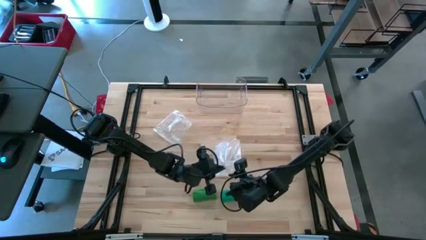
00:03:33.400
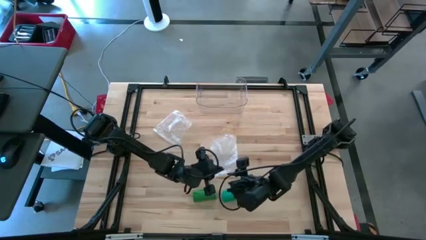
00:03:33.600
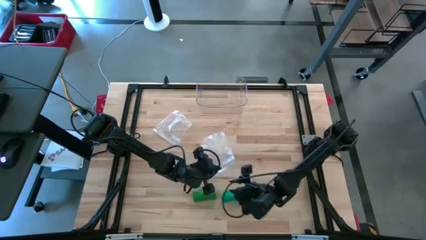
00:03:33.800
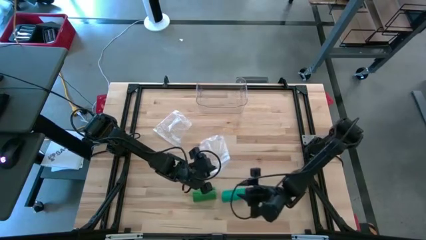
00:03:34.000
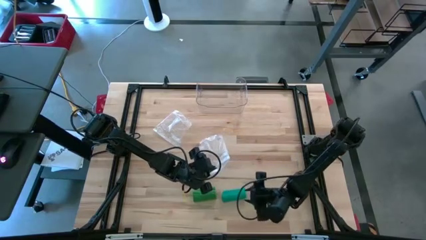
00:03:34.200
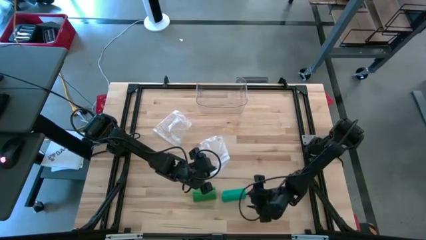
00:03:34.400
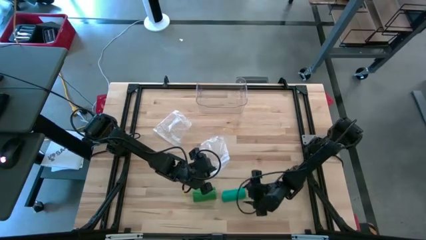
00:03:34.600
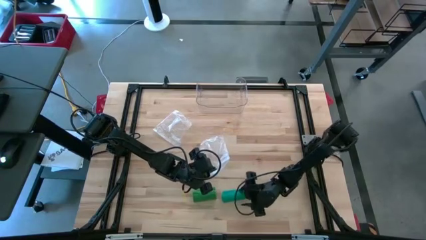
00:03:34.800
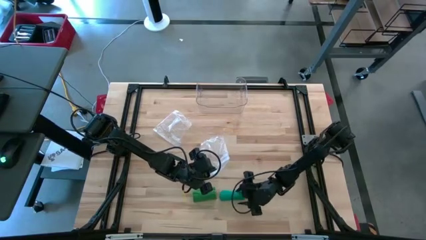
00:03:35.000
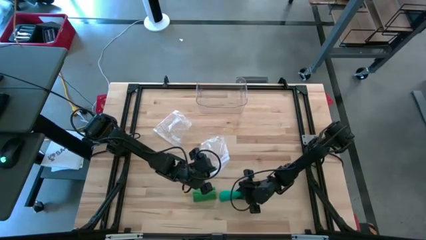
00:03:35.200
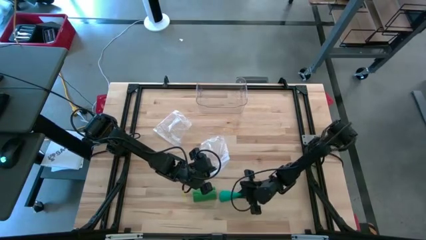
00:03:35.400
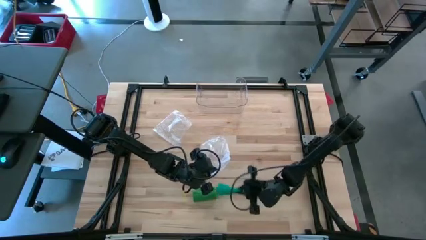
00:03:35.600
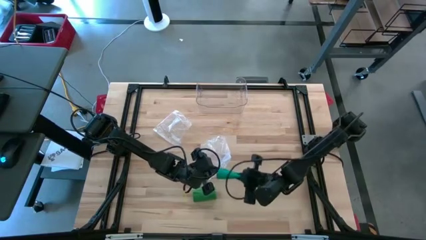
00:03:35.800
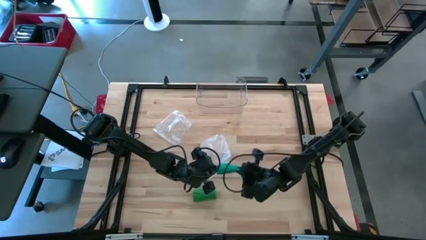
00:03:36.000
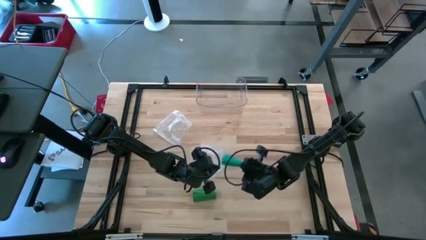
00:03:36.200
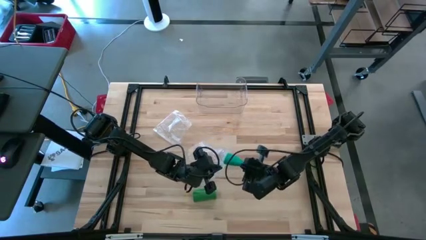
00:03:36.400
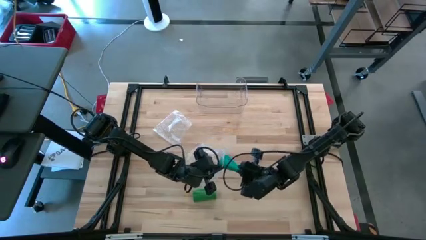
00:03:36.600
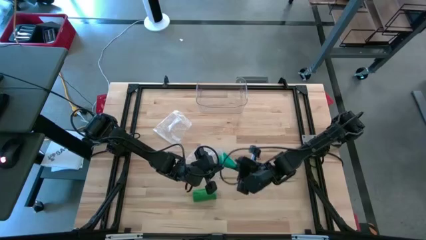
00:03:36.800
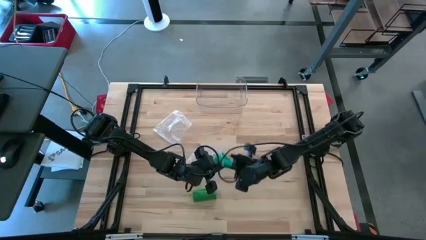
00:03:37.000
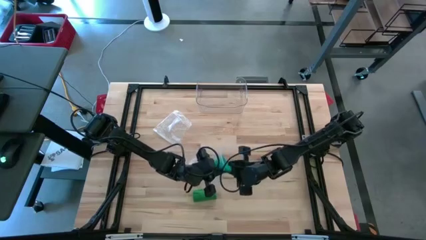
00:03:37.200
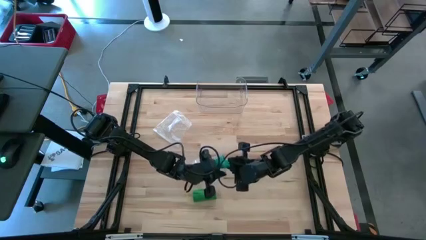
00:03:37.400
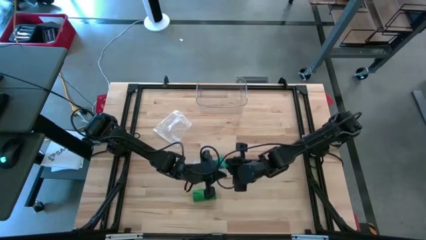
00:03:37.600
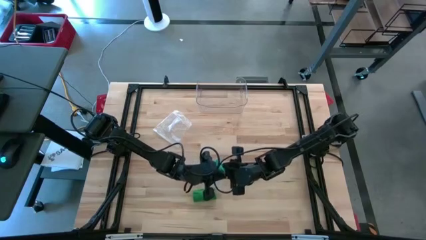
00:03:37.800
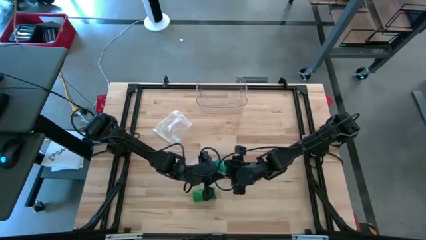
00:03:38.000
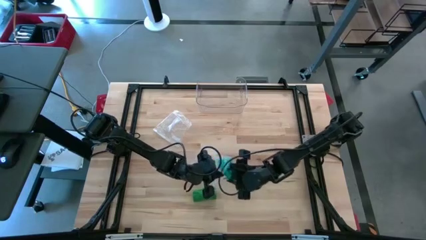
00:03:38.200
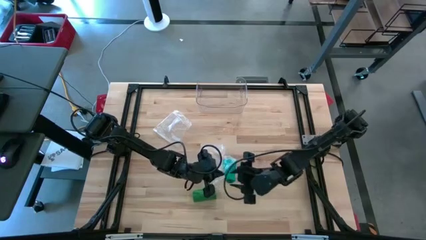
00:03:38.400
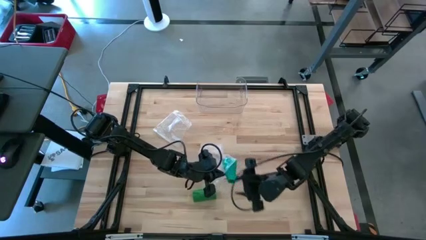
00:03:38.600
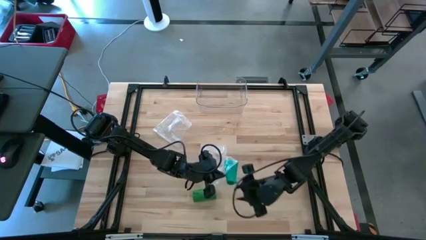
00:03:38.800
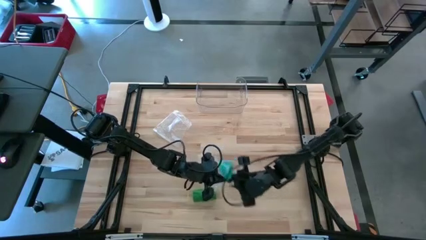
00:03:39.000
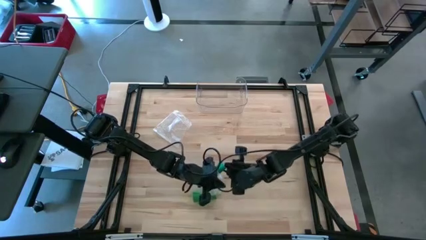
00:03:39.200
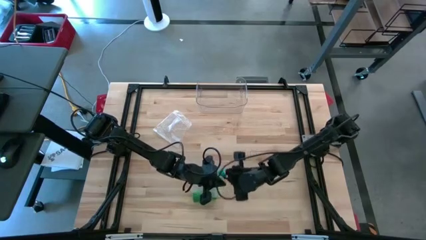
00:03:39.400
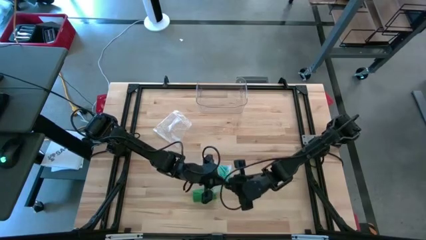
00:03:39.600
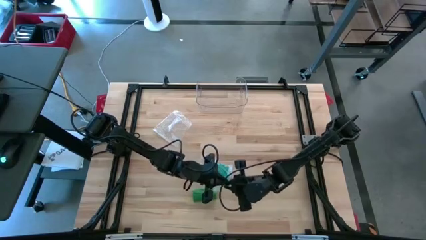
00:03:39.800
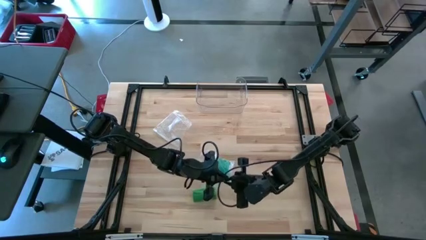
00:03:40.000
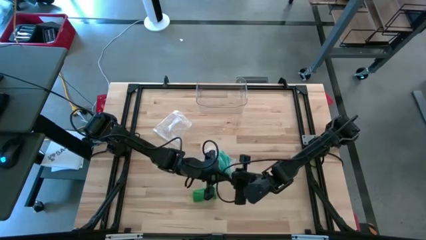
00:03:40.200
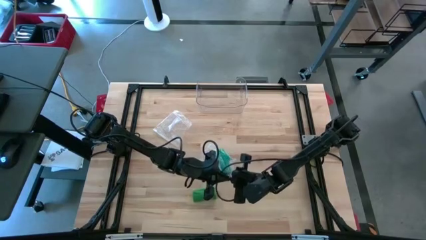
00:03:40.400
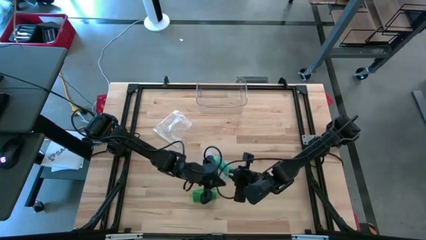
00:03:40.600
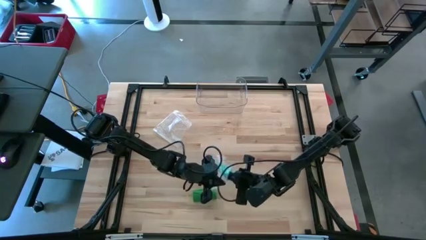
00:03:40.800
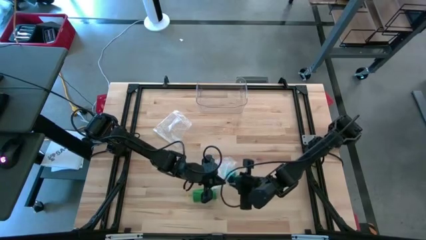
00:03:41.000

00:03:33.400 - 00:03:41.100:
Task: Roll bandage
Put blue bandage into transparent zip bag

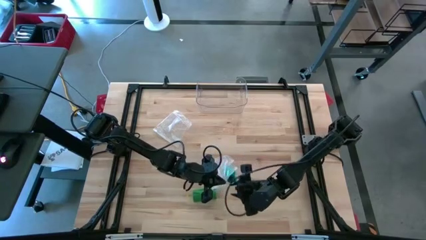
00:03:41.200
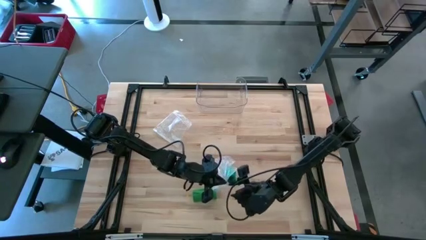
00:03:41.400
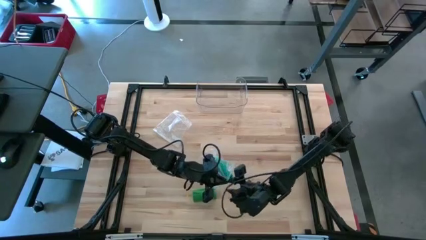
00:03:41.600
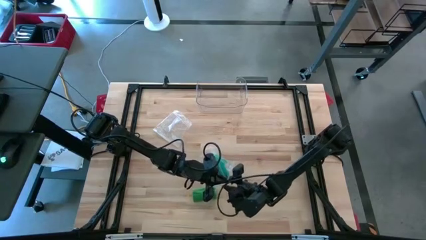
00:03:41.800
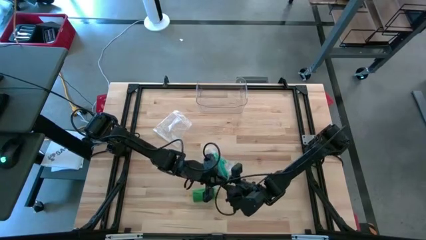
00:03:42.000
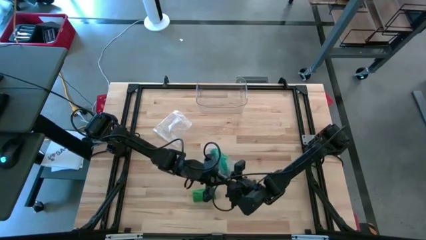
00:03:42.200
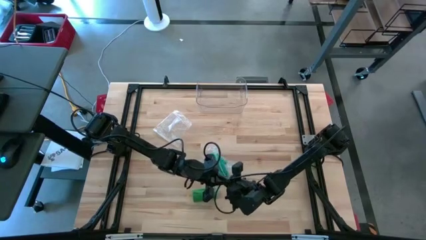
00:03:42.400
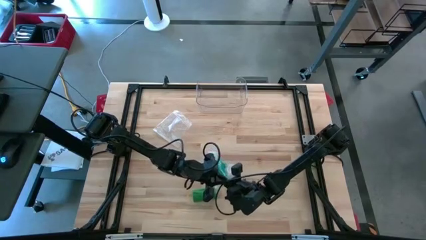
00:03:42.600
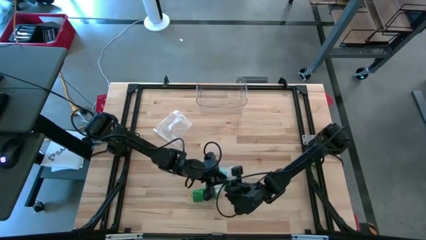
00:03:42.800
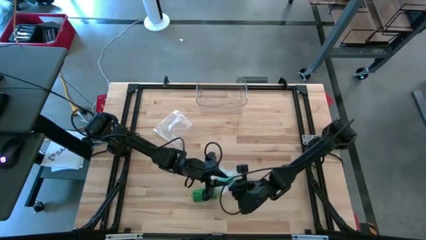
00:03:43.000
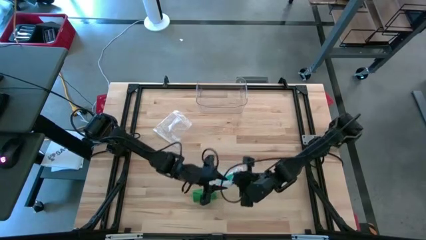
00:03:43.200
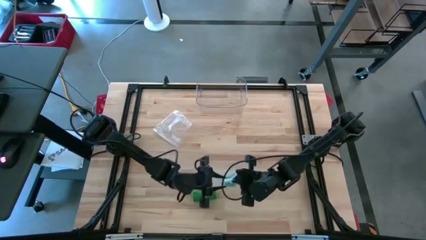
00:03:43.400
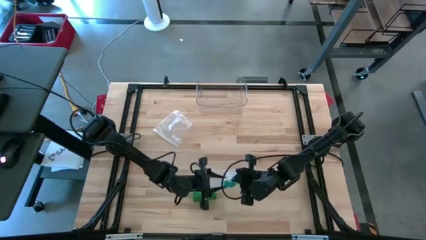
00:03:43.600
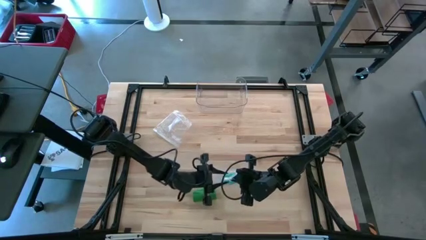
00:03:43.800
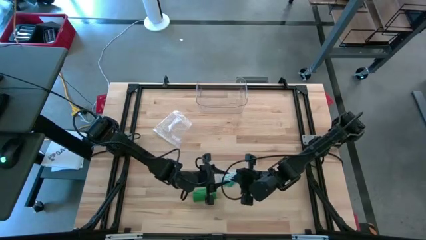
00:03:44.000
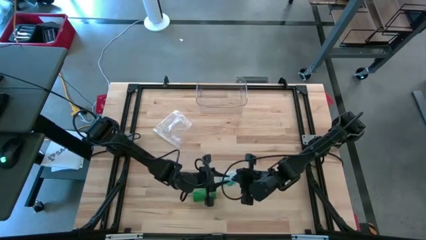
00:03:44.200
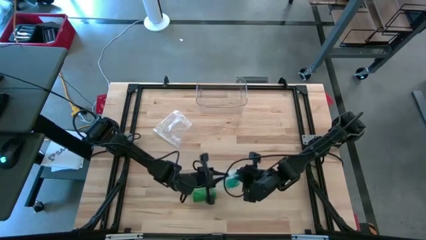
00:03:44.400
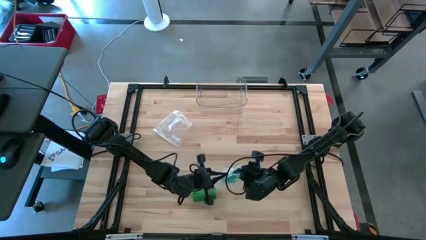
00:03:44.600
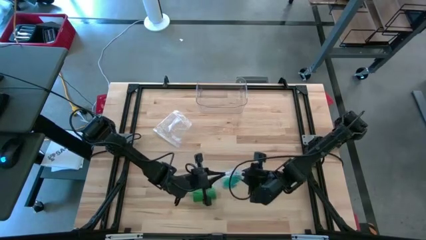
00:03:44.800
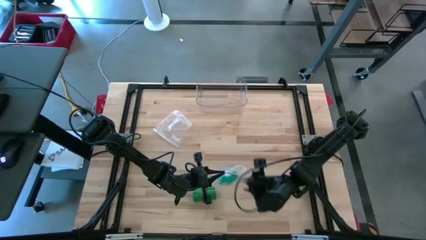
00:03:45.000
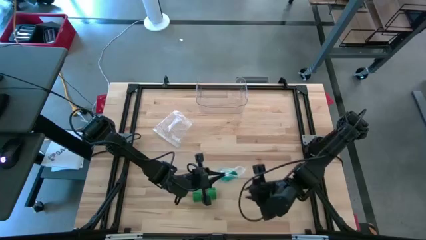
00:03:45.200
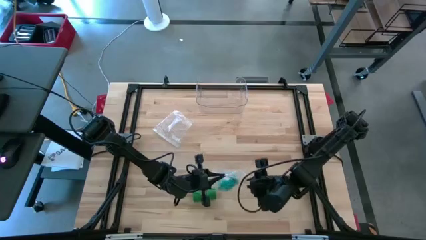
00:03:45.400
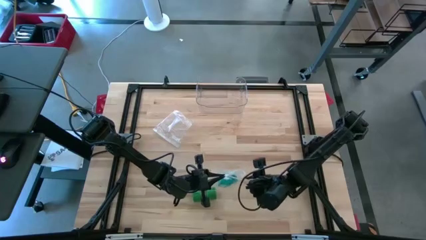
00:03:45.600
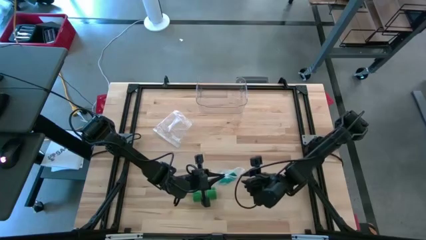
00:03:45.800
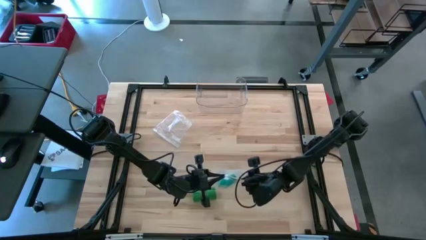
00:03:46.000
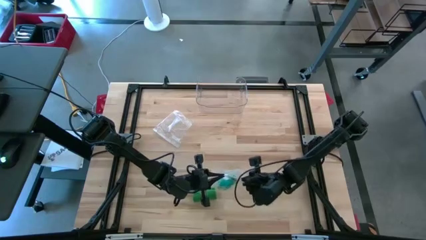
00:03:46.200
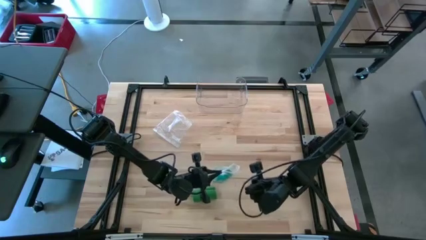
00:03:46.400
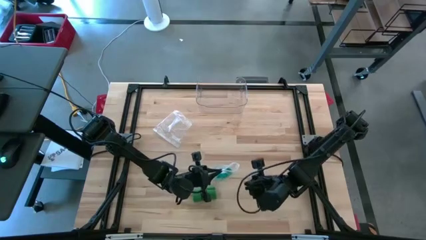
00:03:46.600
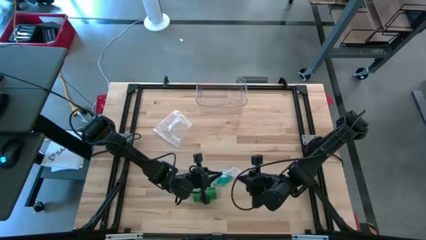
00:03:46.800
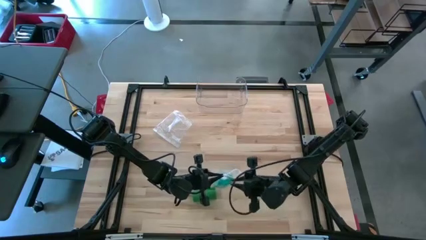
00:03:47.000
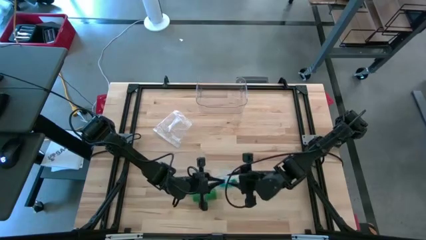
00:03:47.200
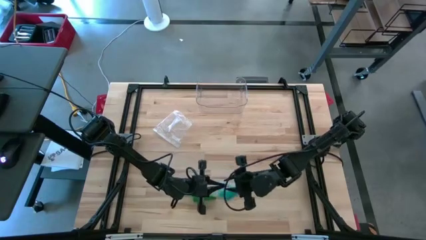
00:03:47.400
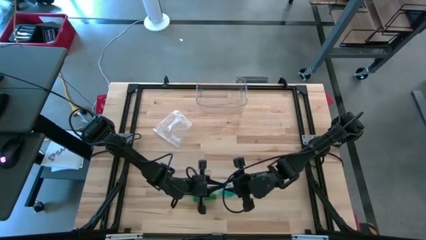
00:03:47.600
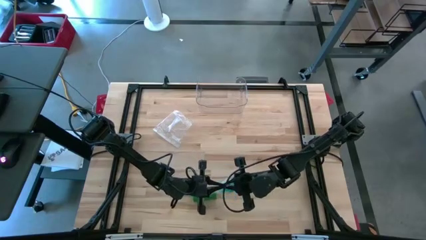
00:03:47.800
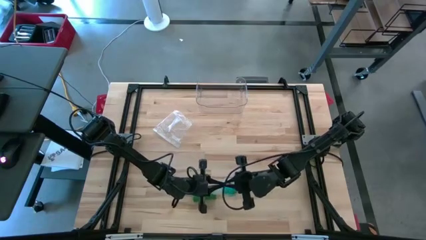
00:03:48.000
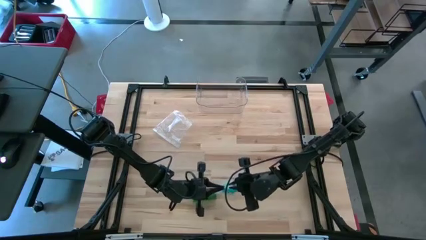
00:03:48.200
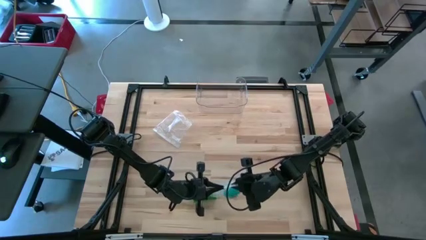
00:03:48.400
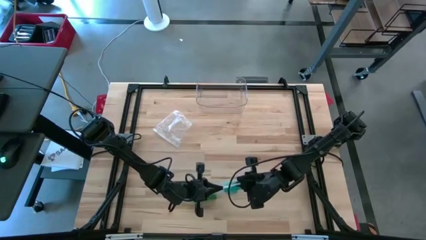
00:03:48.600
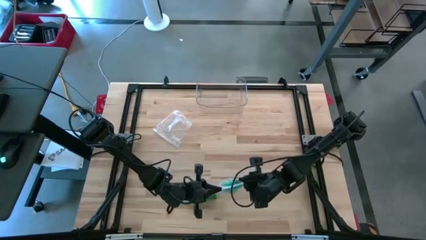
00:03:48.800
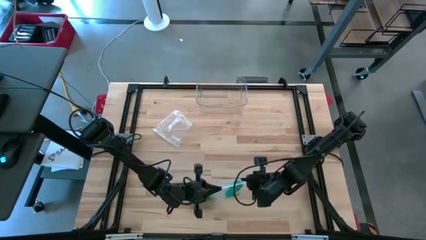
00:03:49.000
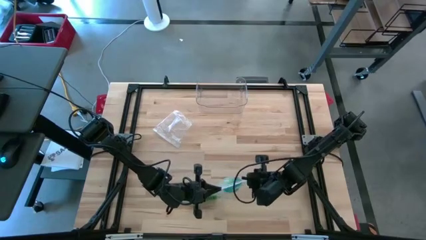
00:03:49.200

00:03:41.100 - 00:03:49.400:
Close the transparent zip bag

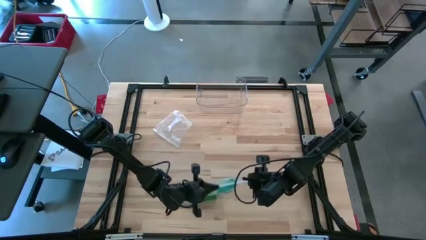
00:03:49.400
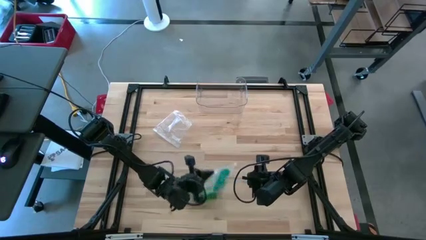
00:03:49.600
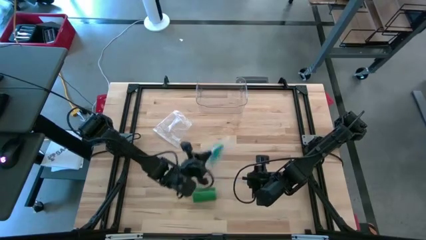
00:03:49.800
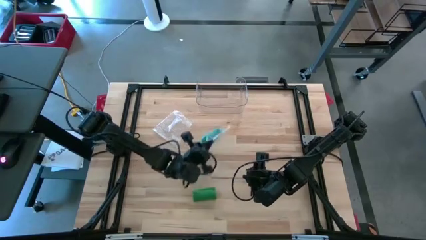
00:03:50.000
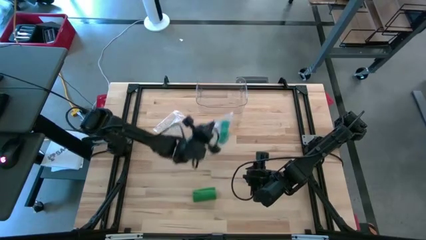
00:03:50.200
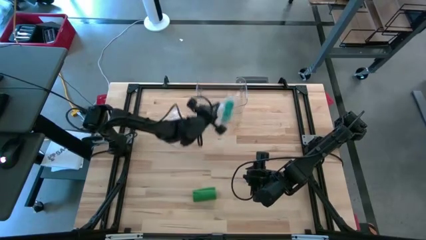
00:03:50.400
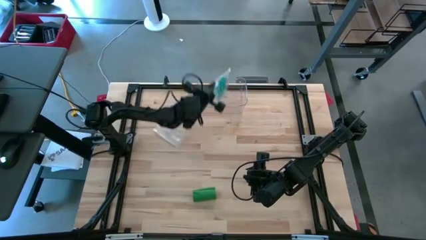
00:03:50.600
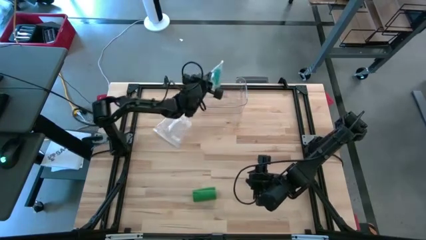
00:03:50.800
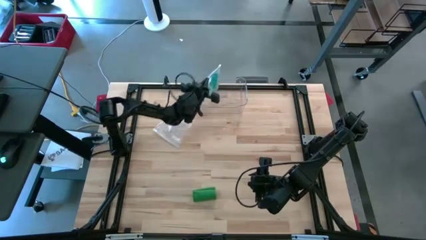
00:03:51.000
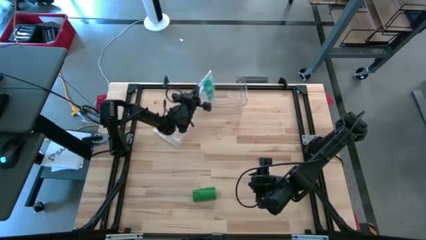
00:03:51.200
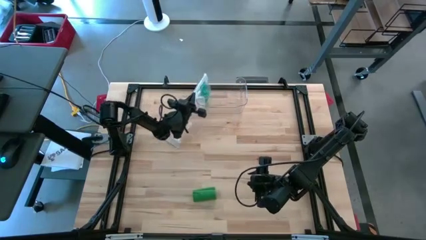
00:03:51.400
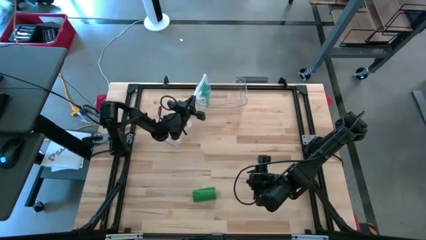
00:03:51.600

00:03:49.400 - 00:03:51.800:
Put the transparent zip bag with blue bandage into transparent bin
